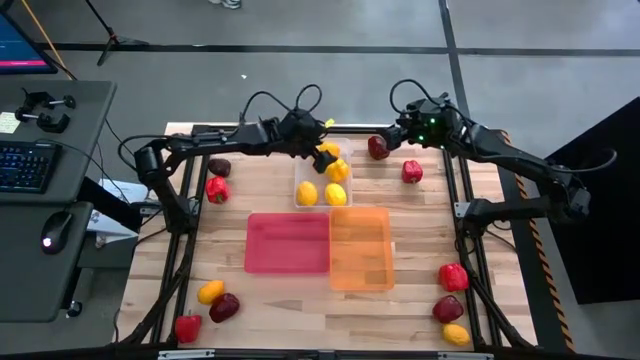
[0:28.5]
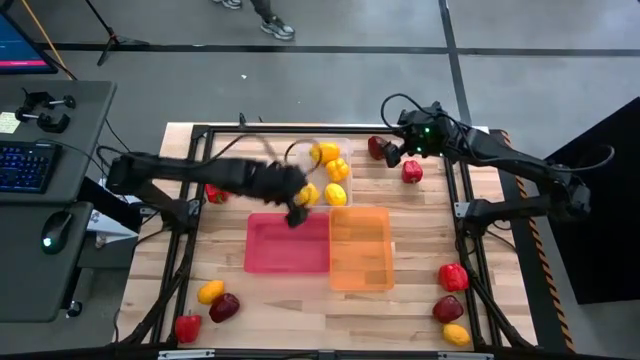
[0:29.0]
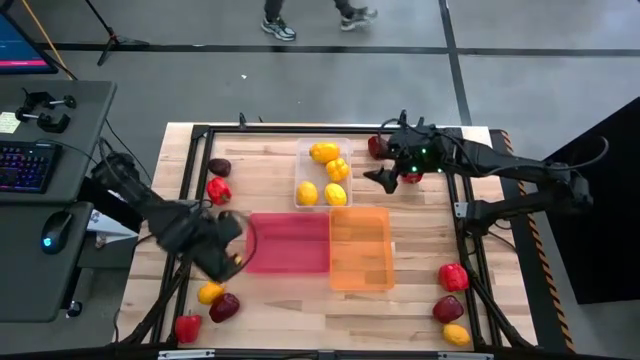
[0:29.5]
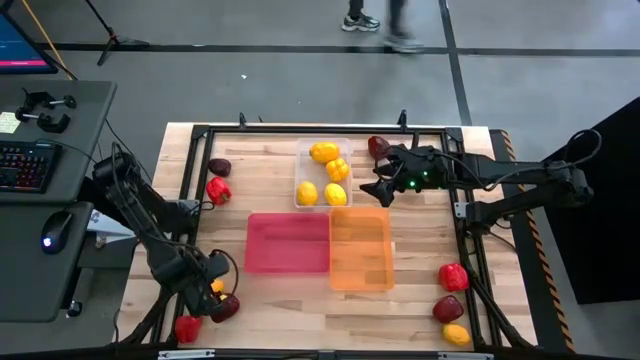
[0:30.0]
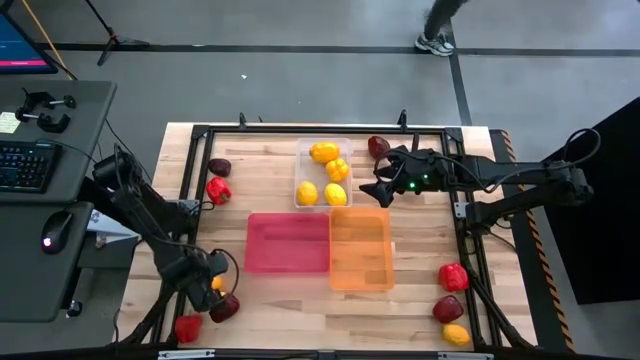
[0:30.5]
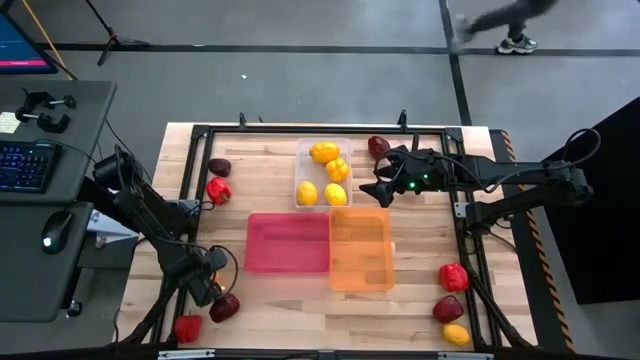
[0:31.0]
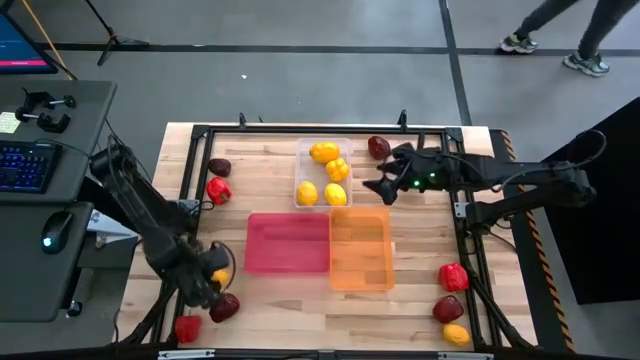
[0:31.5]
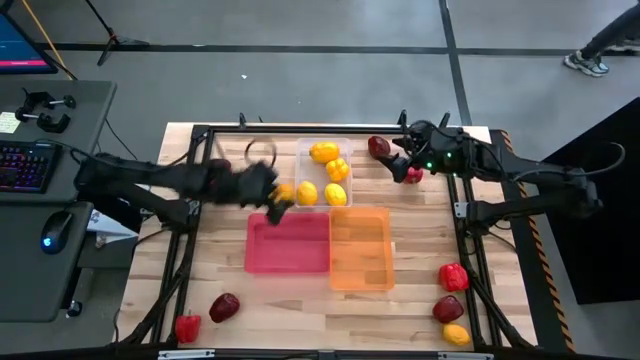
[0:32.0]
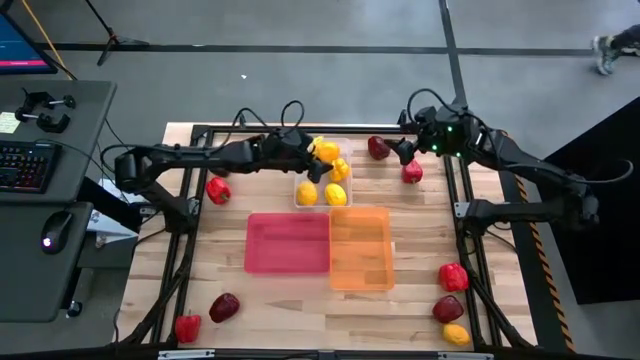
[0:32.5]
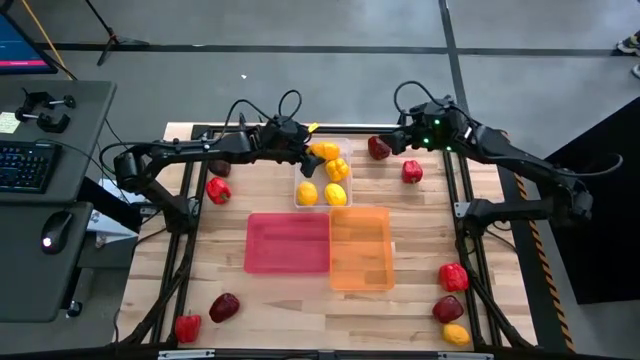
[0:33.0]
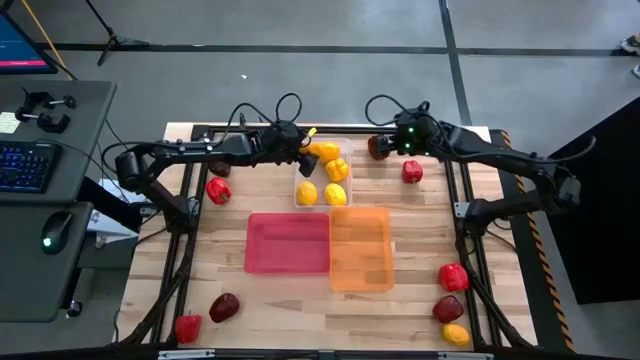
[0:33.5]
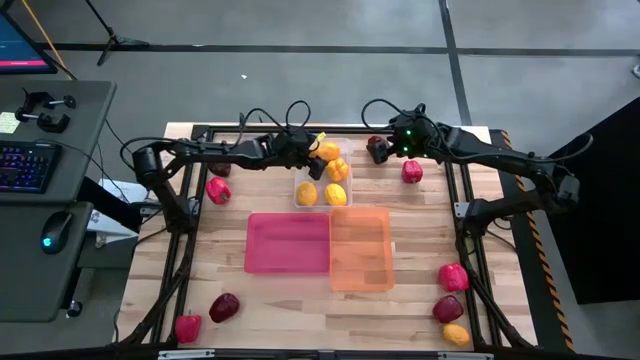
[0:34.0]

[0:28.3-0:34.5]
Task: Sort produce into baskets
Put the lemon into the white bin

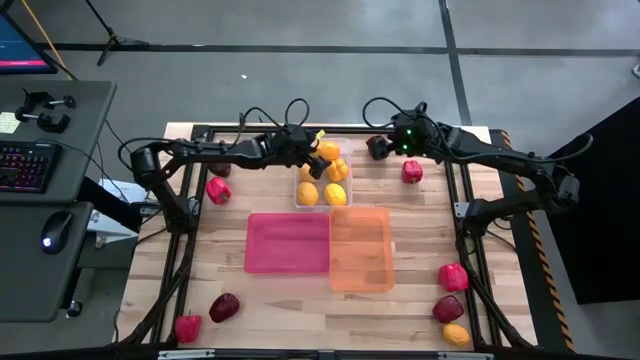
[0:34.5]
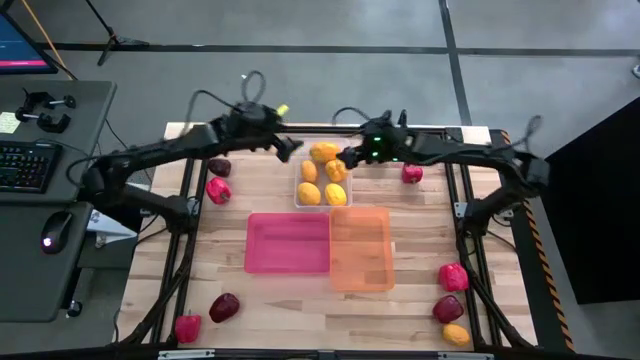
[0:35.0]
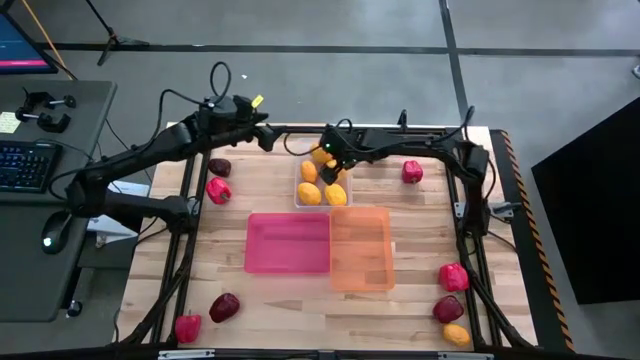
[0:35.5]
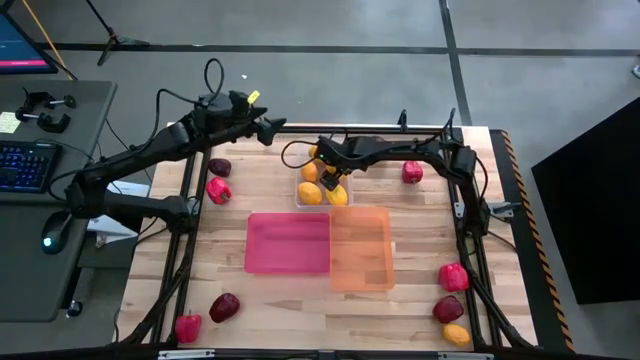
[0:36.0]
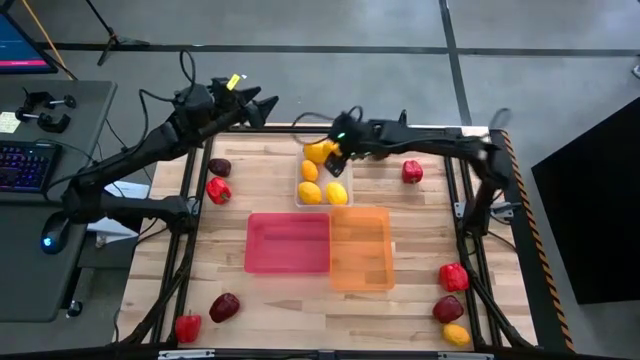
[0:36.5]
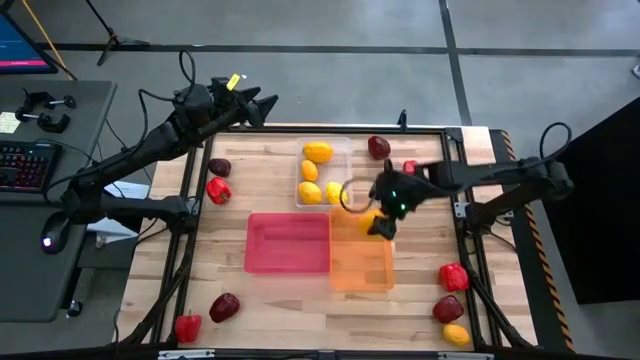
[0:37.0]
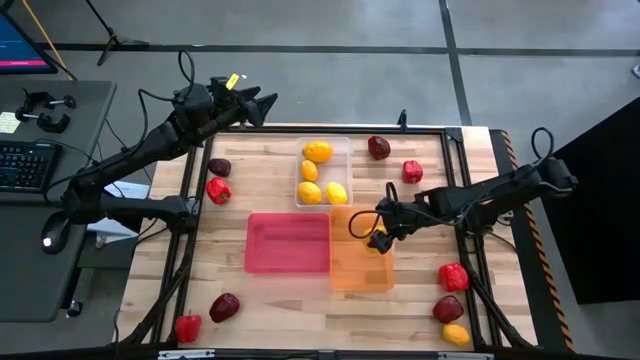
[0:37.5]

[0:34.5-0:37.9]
Move the yellow bell pepper into the orange bin

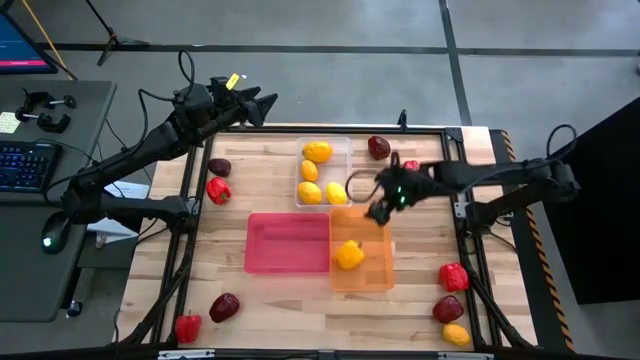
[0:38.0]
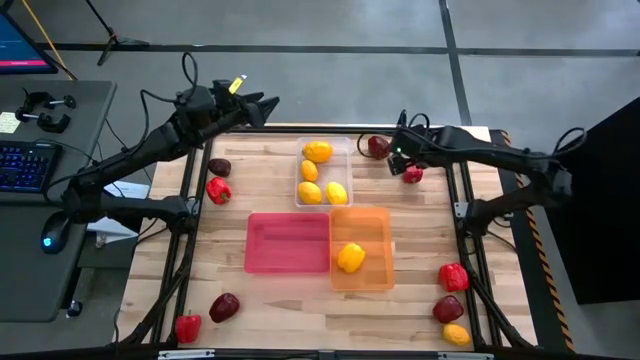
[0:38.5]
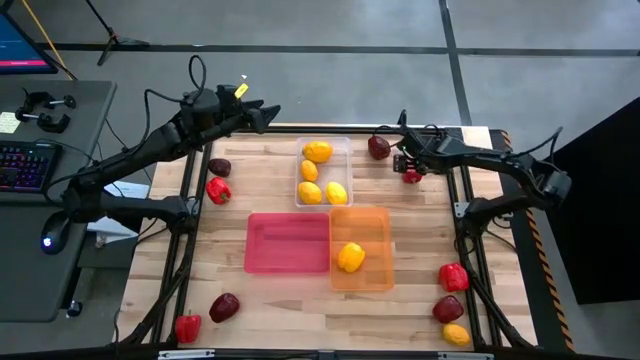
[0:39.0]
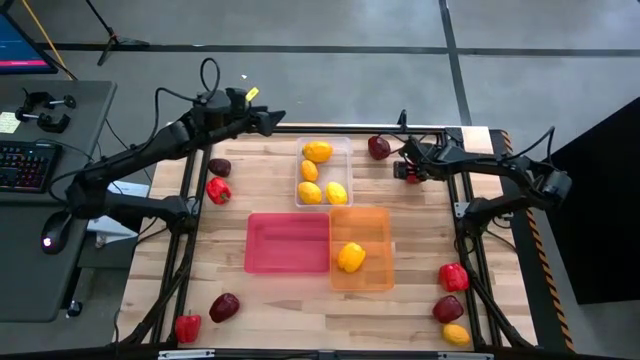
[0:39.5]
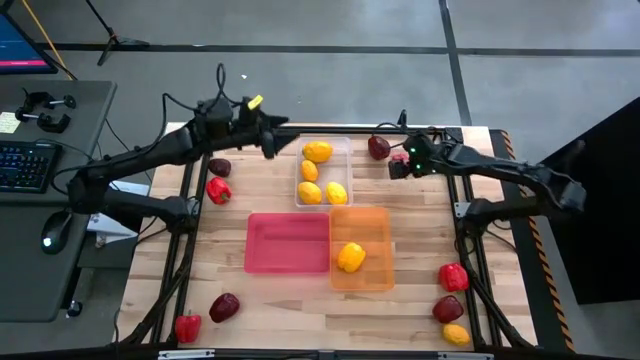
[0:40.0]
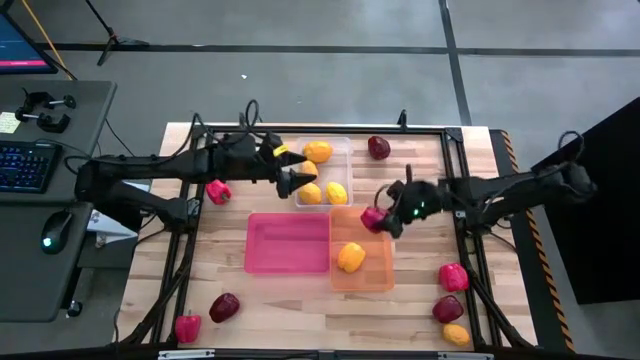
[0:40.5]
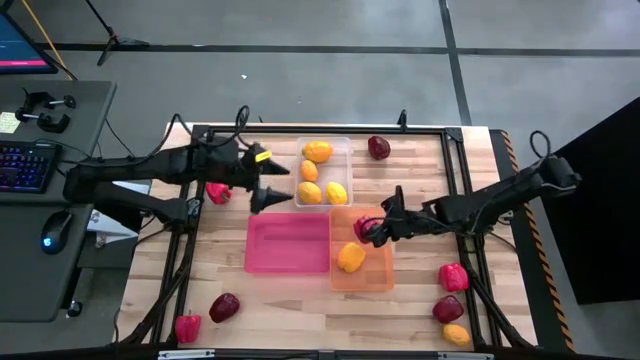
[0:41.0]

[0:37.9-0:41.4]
Put the red bell pepper into the orange bin

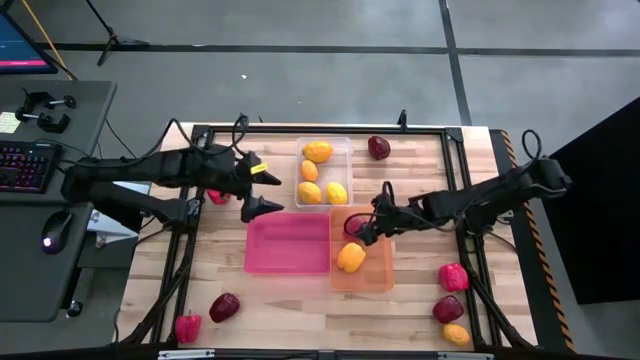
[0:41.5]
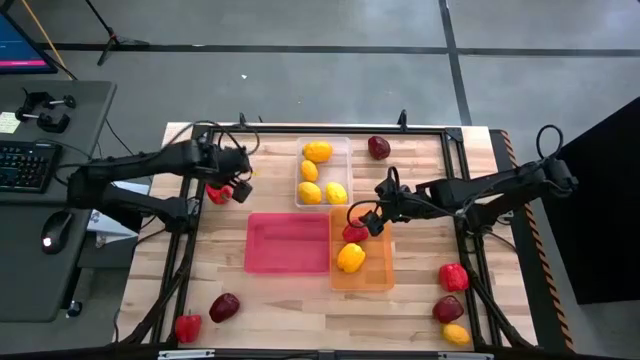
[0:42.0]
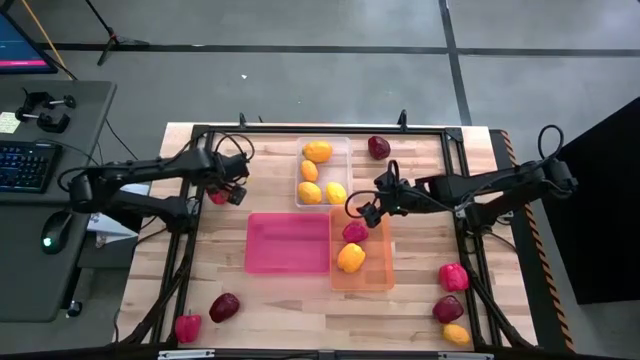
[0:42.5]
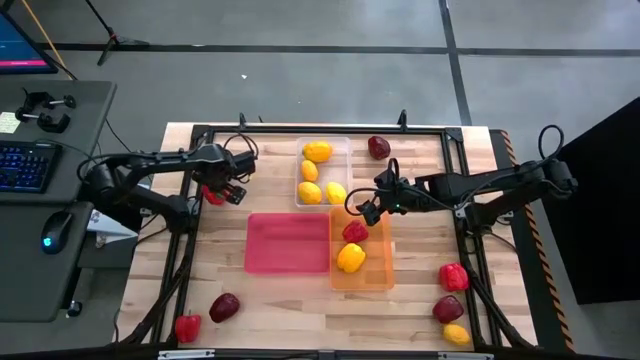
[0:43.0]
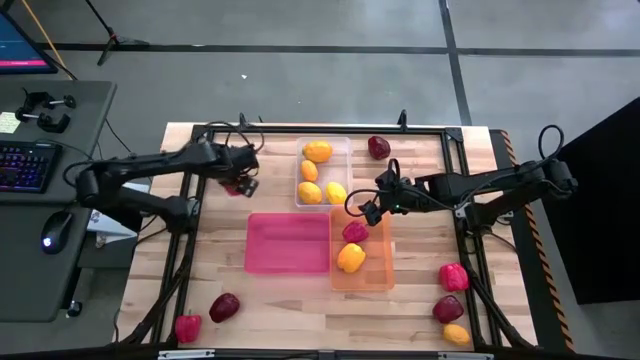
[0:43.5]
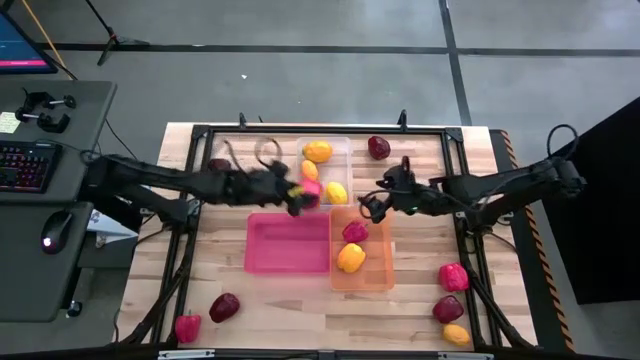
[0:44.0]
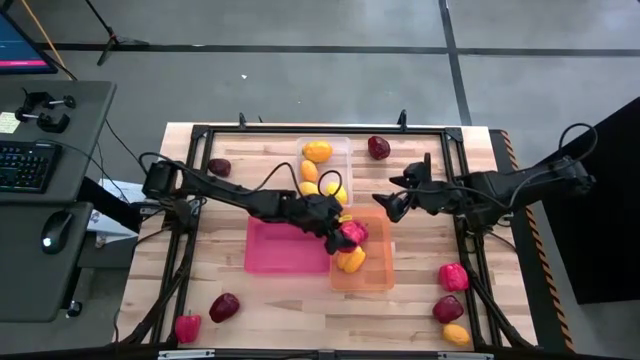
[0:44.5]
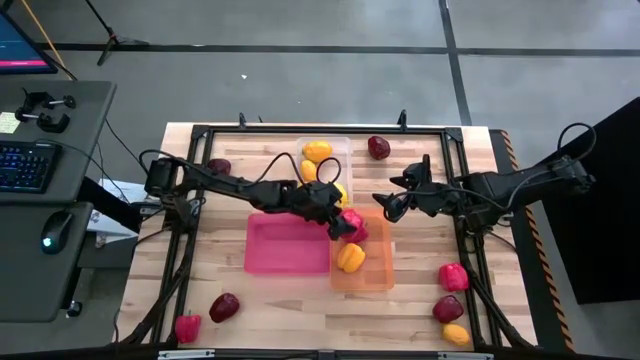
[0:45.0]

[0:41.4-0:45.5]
Put the red bell pepper into the orange bin

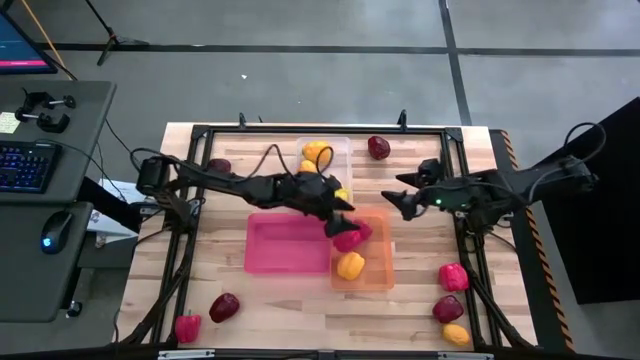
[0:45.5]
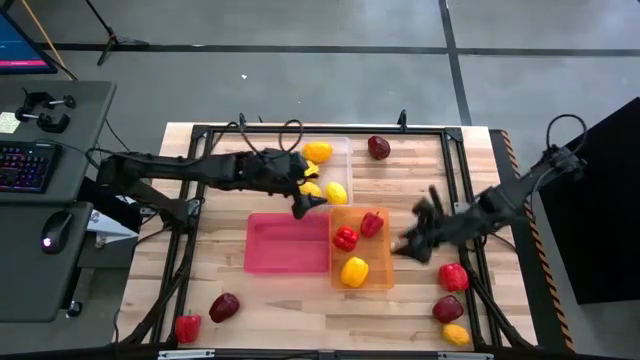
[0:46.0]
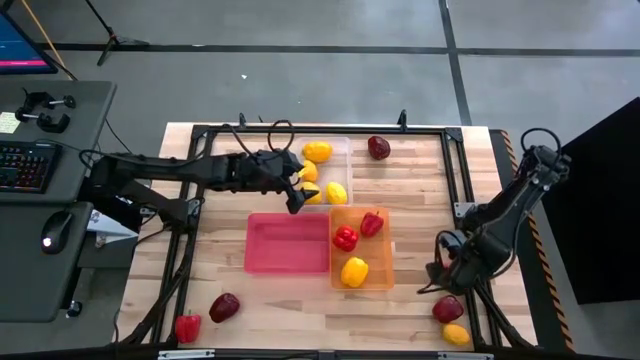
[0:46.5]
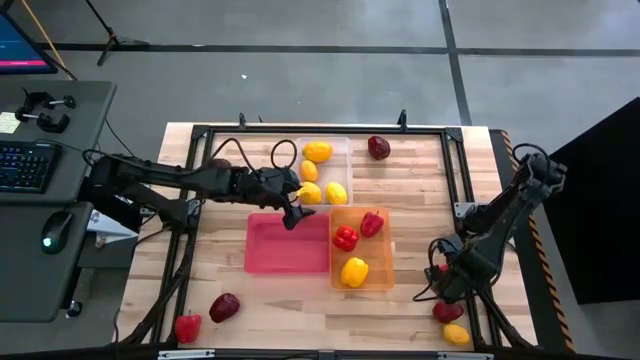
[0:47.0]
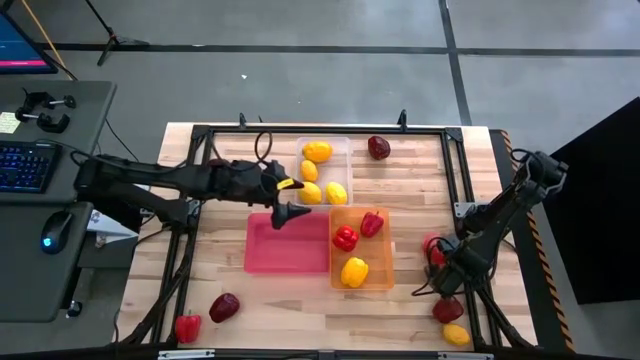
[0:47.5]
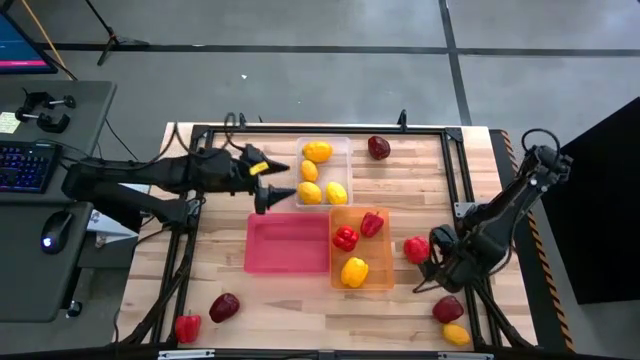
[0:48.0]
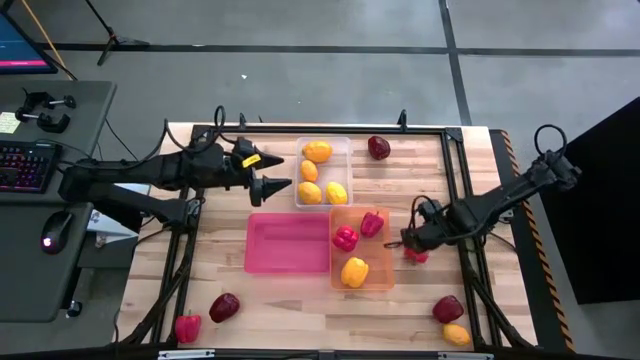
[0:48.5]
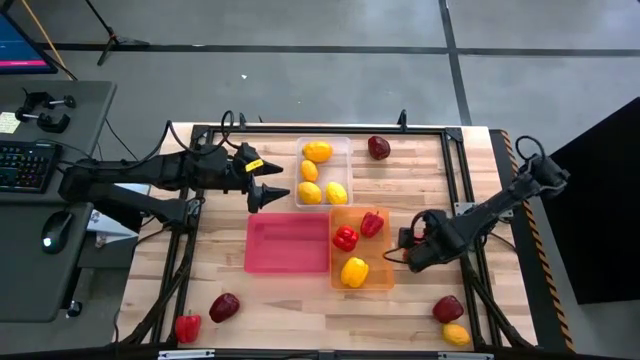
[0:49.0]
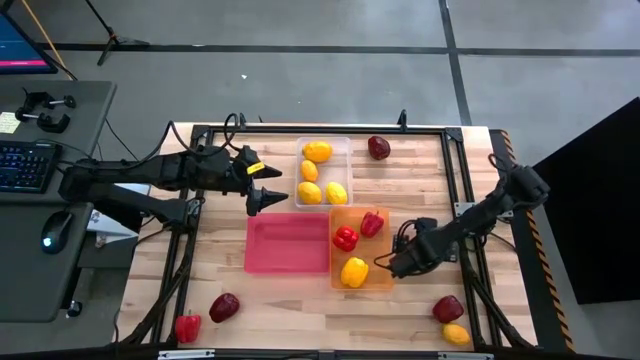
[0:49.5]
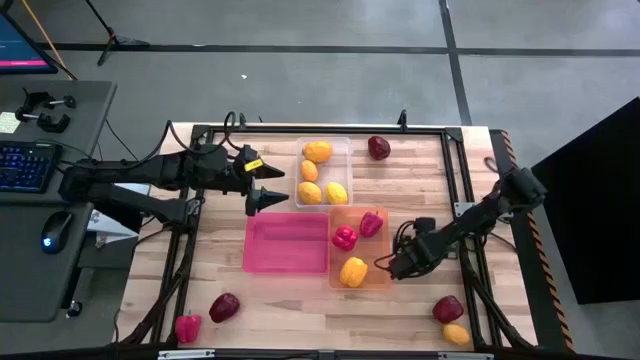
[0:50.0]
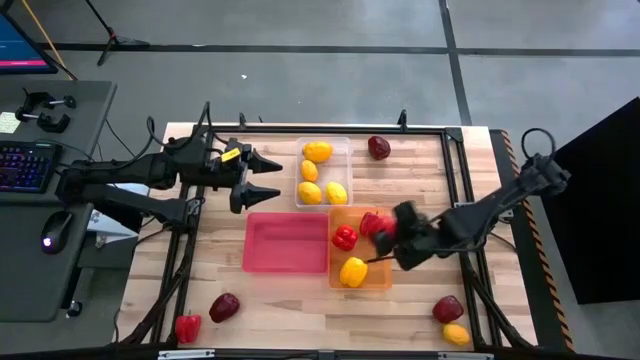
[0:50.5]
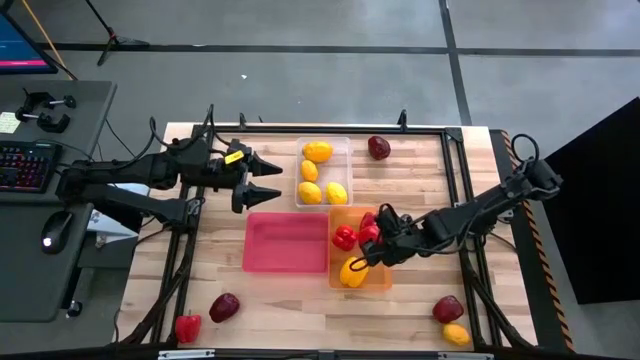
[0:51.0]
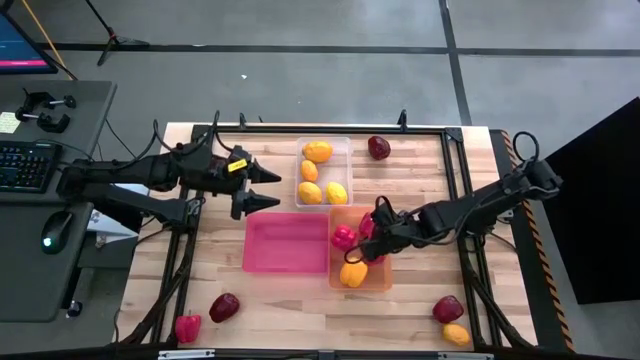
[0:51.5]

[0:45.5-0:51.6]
Put the red bell pepper into the orange bin
